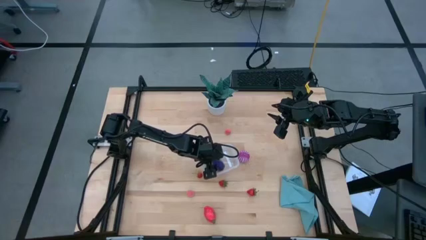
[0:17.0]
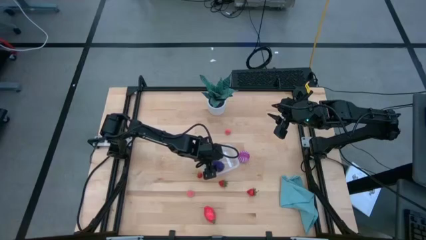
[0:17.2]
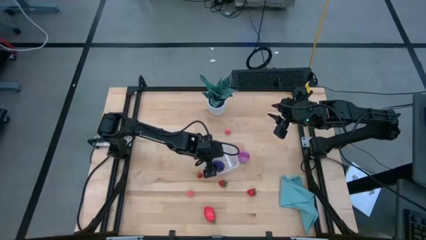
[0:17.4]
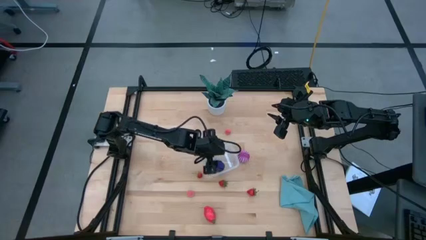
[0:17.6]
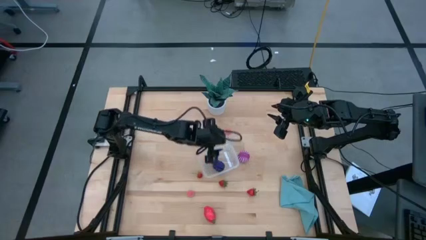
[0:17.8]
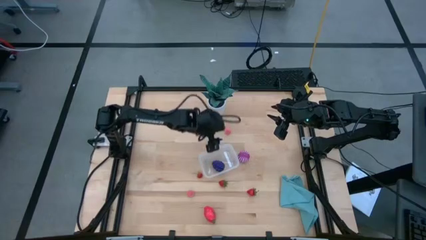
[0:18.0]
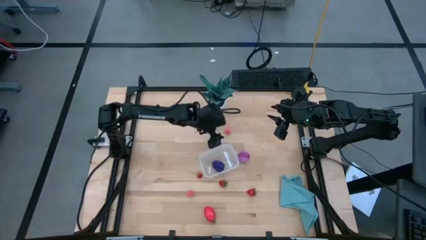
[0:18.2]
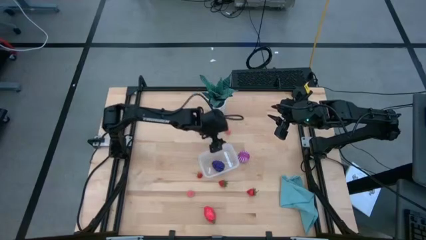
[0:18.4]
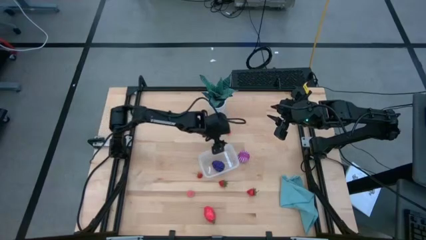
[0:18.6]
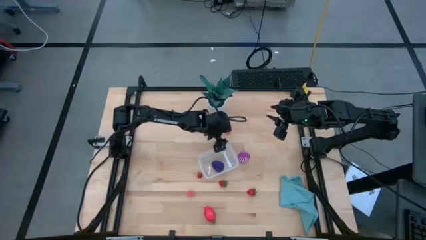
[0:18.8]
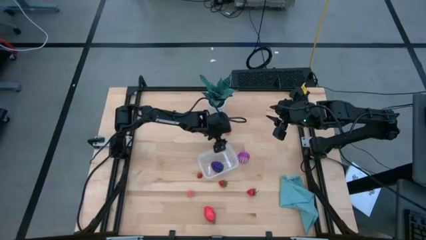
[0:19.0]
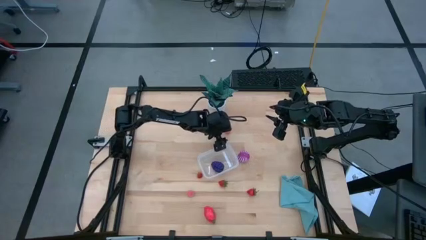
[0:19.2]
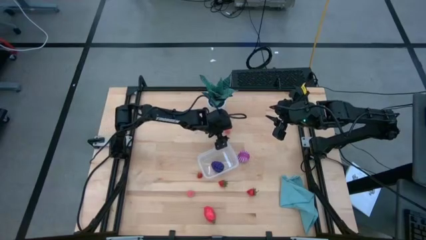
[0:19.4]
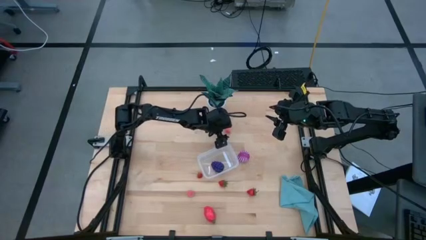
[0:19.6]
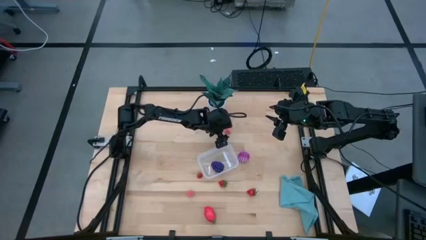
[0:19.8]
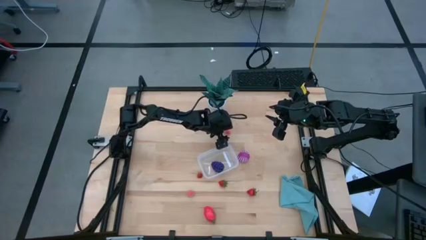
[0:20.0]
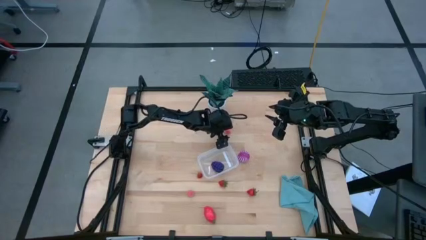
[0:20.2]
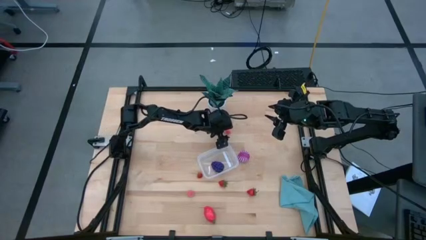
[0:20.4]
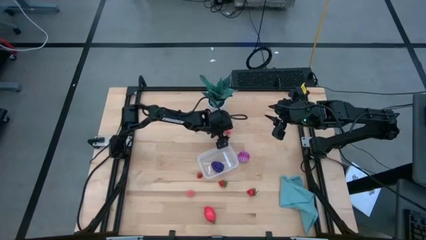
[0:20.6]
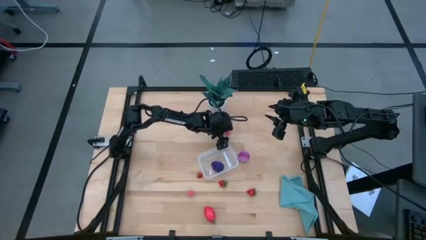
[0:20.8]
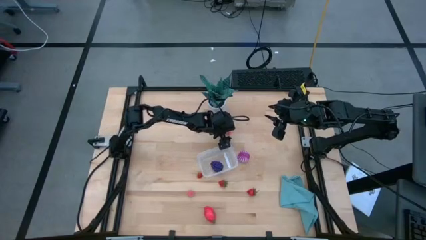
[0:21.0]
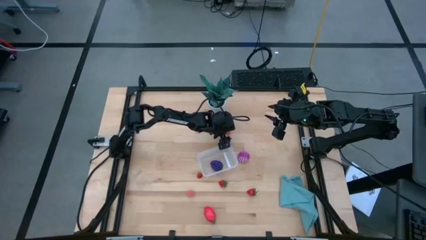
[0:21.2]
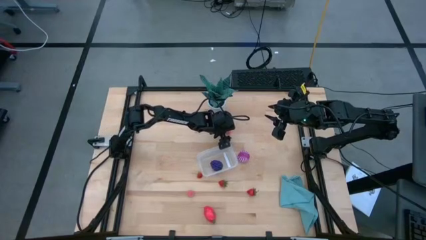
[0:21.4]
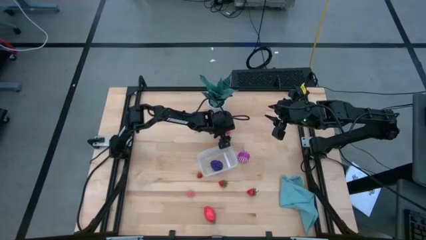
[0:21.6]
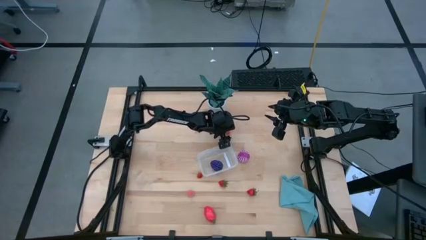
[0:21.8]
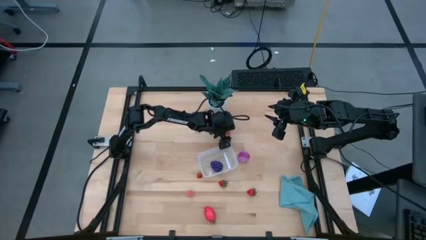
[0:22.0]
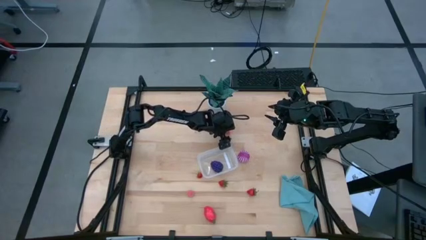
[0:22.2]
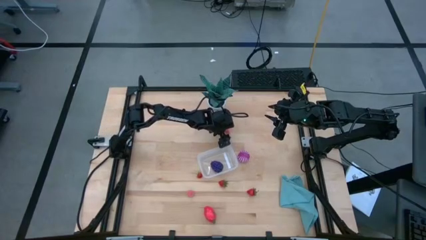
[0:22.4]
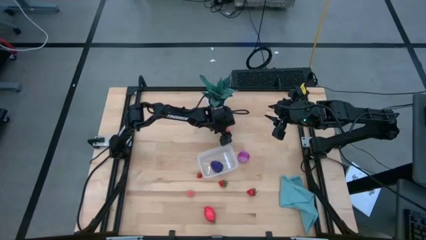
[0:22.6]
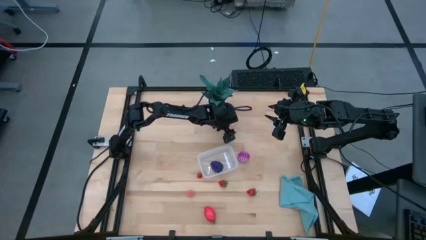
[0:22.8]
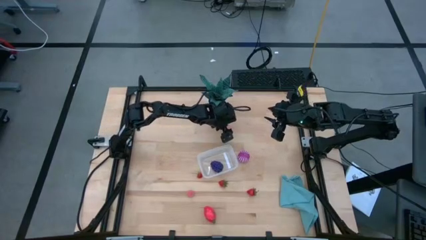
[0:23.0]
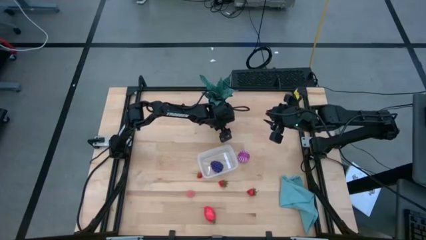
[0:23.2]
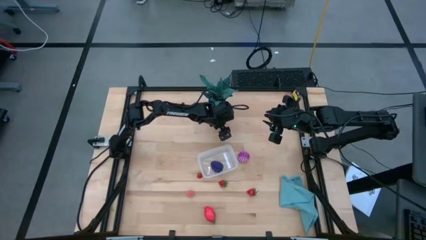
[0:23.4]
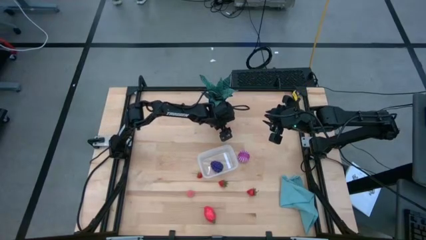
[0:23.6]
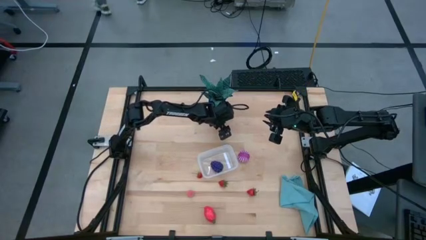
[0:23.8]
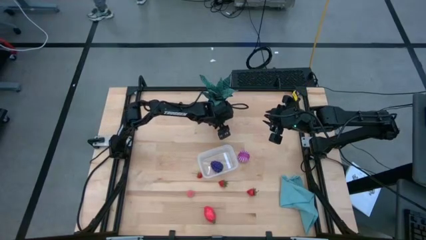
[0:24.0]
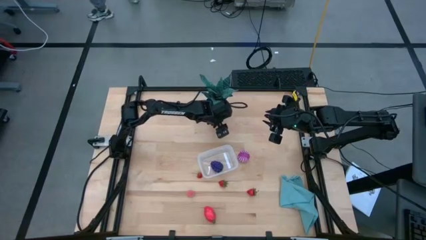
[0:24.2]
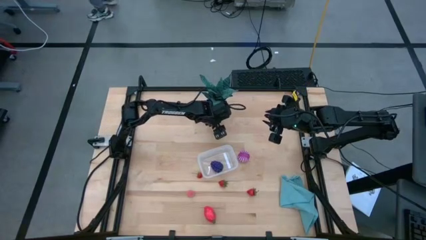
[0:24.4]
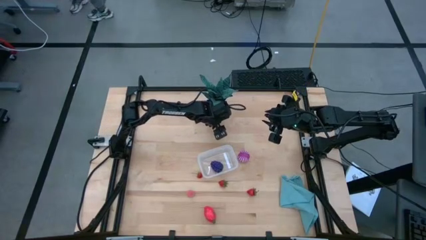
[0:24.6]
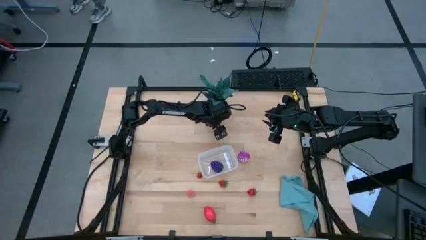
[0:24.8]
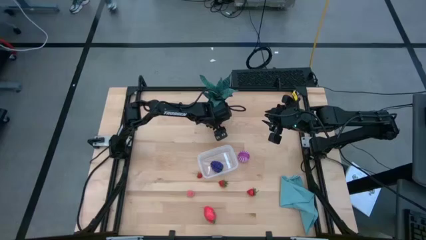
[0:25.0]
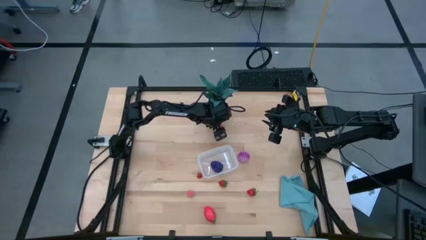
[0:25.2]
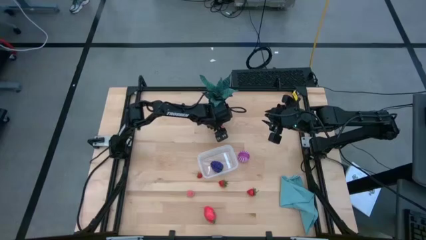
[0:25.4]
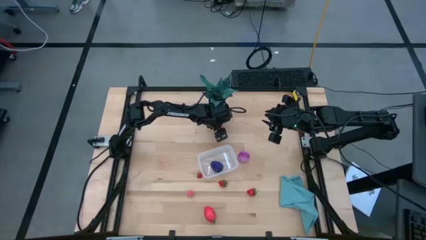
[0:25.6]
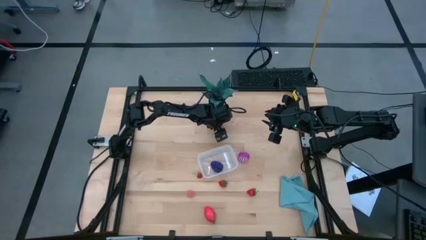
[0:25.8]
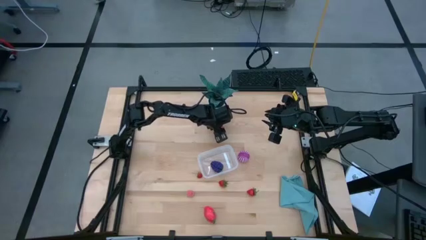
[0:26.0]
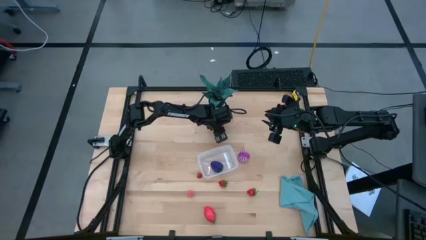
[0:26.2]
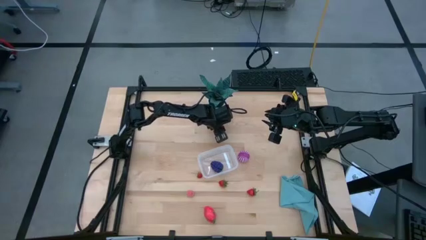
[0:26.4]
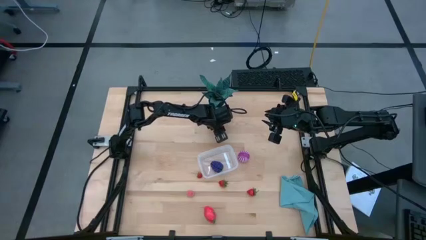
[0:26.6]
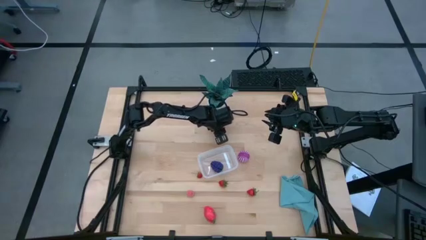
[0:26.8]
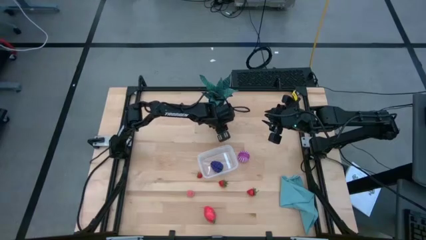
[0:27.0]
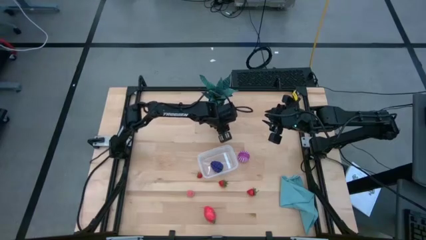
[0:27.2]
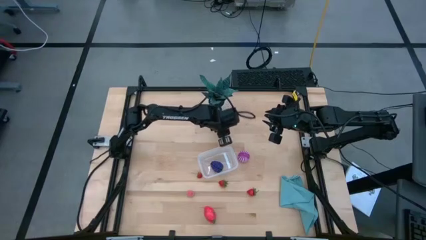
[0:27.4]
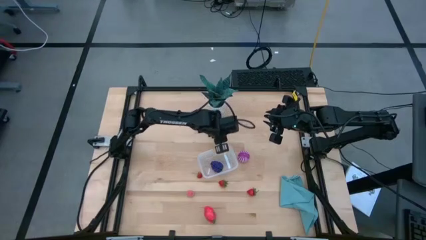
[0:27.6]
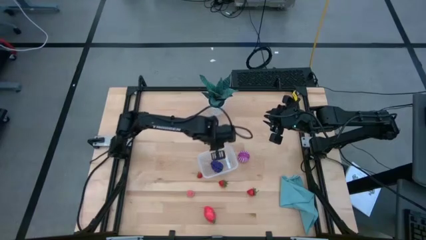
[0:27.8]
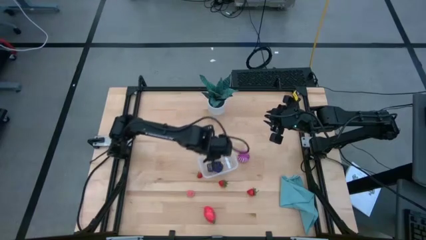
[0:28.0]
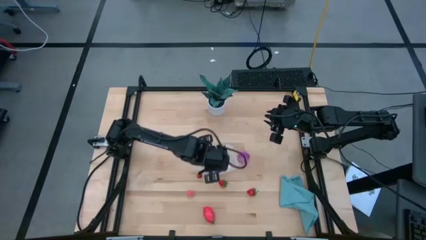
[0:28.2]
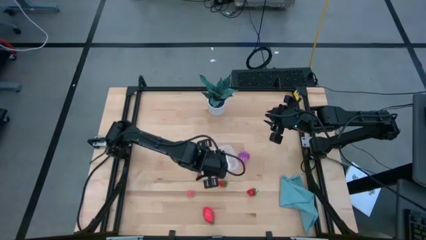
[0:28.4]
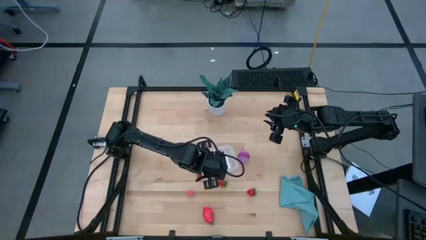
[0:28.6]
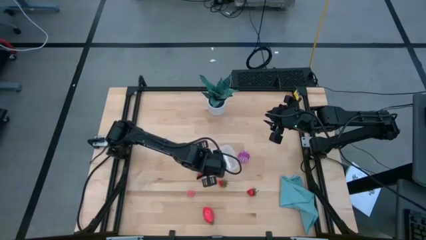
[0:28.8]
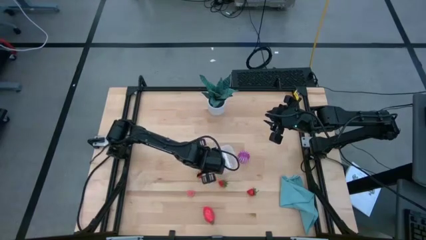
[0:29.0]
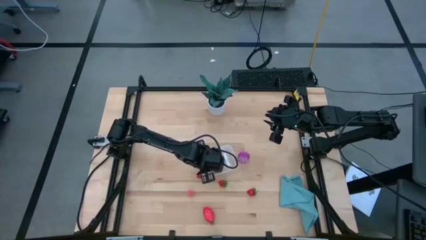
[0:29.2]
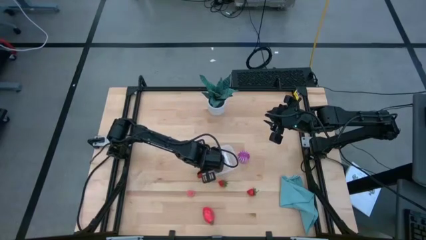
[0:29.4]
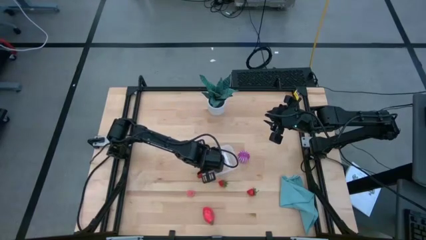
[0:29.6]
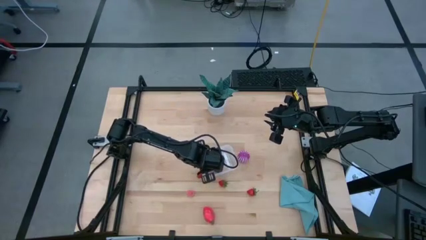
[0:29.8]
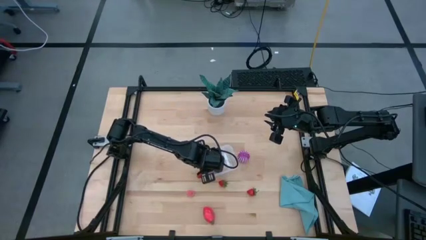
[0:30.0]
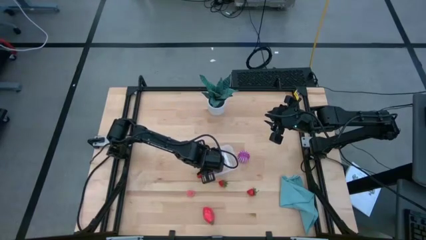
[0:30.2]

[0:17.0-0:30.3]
Task: Pick and placing Produce into tupperware
Put the top peach into the transparent bin
